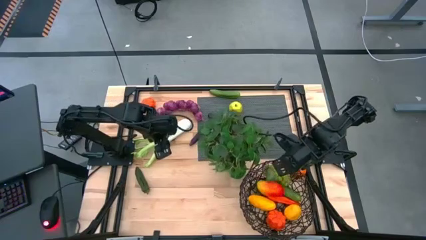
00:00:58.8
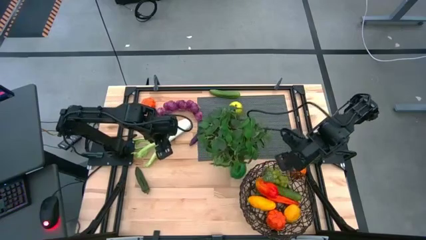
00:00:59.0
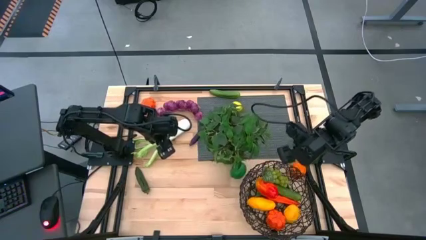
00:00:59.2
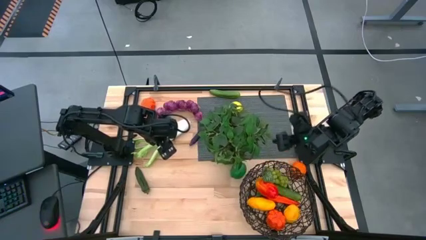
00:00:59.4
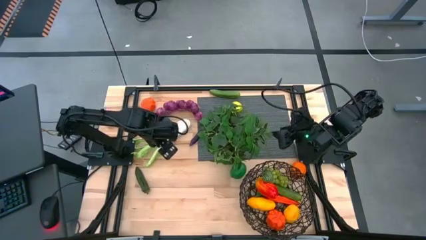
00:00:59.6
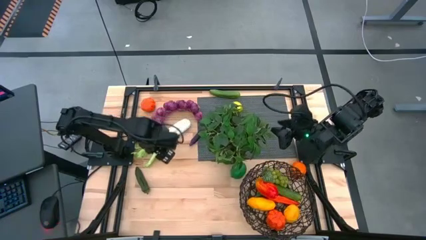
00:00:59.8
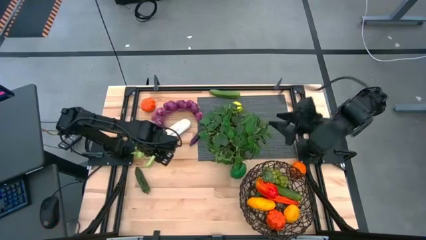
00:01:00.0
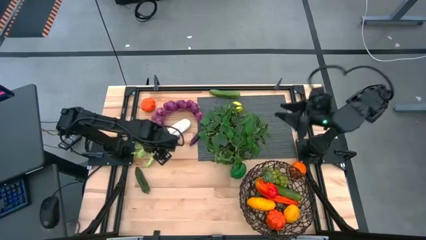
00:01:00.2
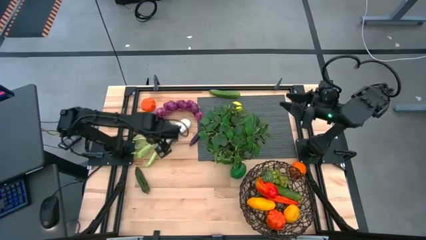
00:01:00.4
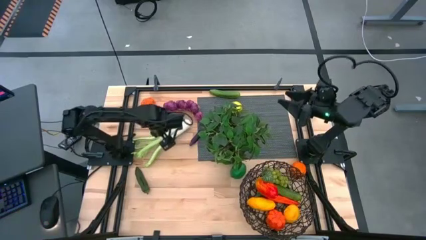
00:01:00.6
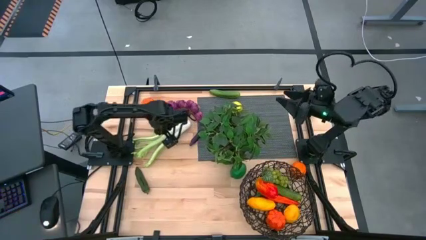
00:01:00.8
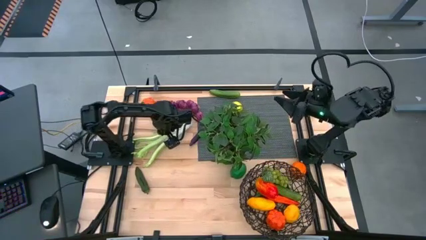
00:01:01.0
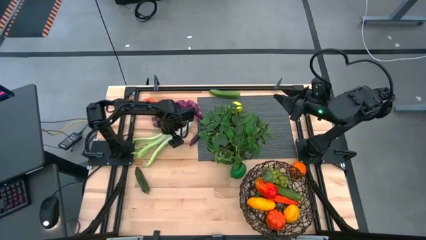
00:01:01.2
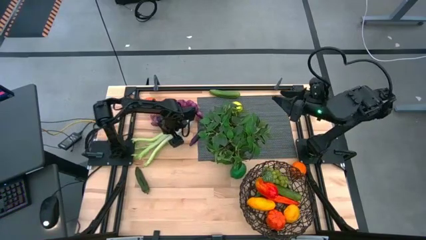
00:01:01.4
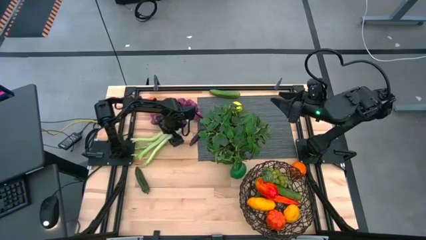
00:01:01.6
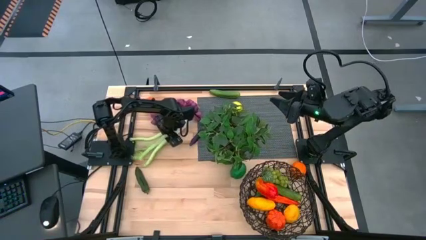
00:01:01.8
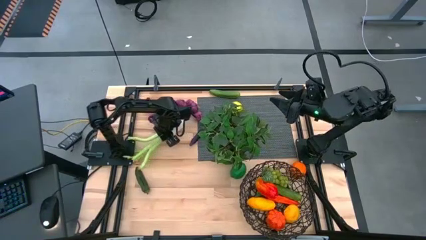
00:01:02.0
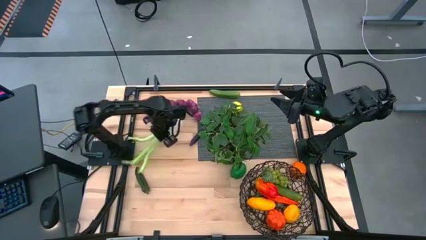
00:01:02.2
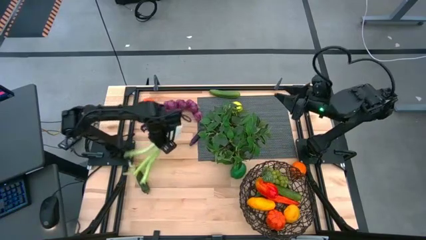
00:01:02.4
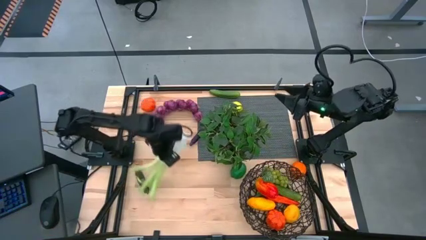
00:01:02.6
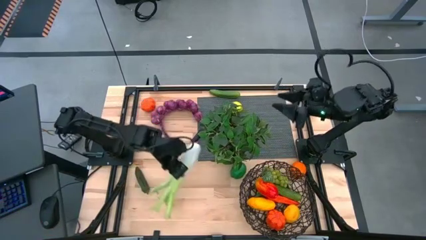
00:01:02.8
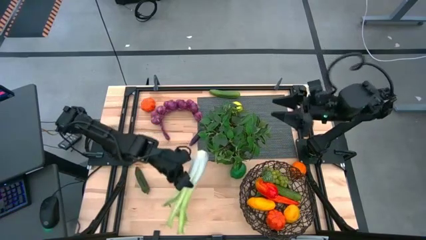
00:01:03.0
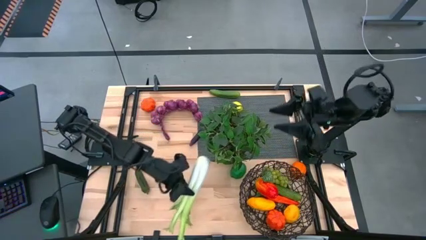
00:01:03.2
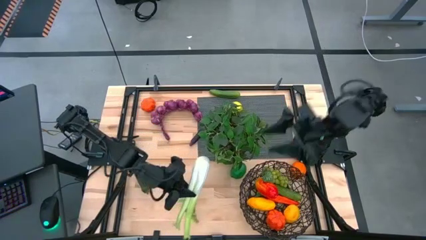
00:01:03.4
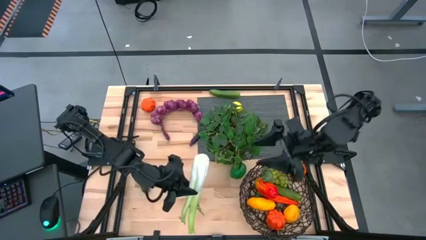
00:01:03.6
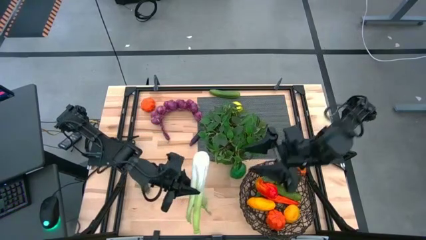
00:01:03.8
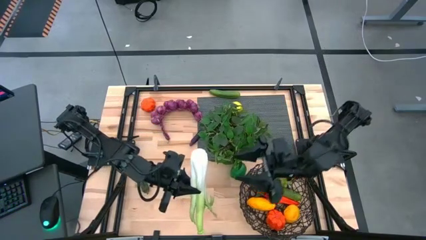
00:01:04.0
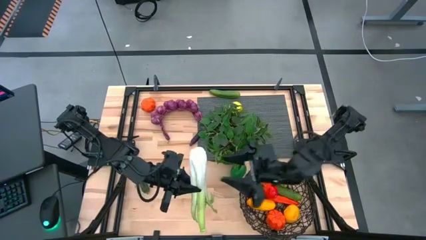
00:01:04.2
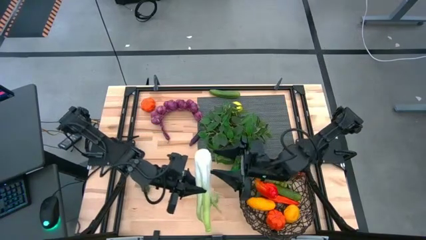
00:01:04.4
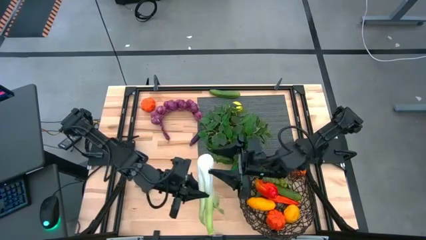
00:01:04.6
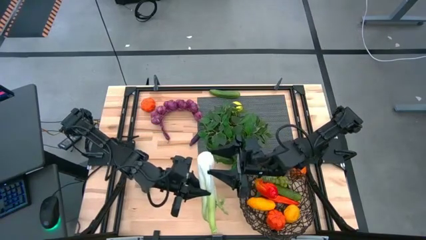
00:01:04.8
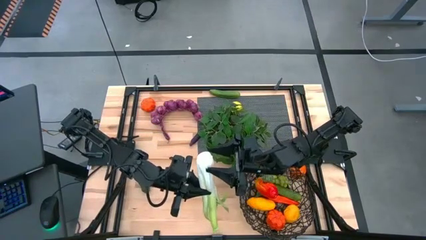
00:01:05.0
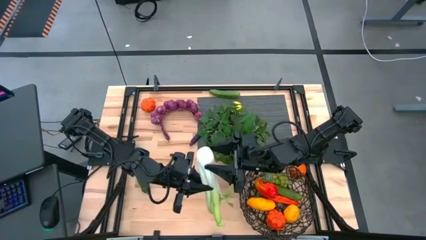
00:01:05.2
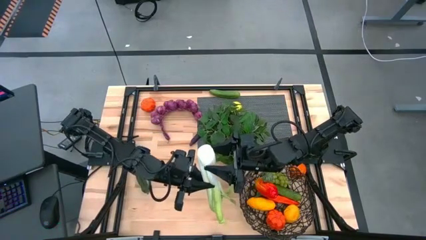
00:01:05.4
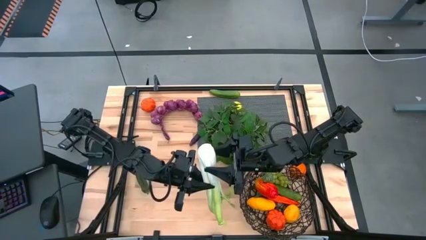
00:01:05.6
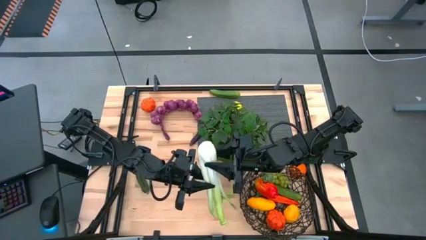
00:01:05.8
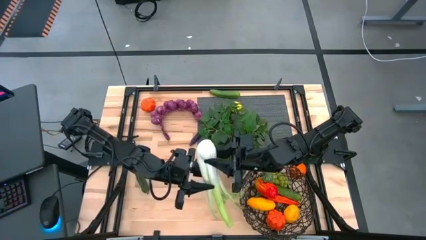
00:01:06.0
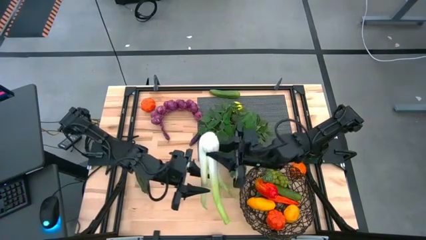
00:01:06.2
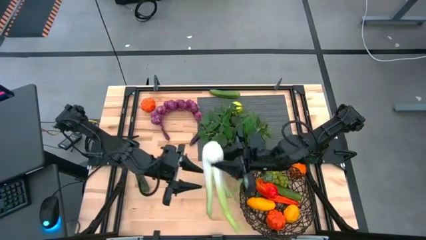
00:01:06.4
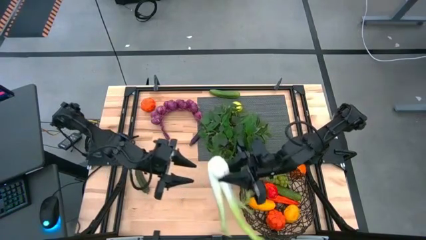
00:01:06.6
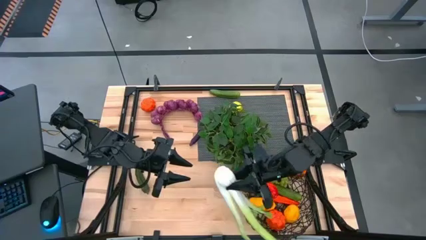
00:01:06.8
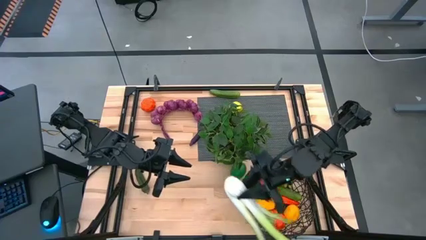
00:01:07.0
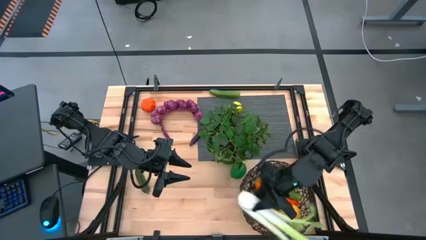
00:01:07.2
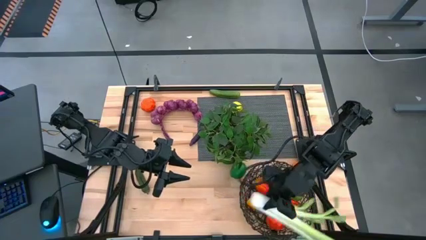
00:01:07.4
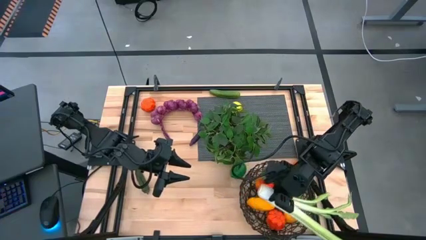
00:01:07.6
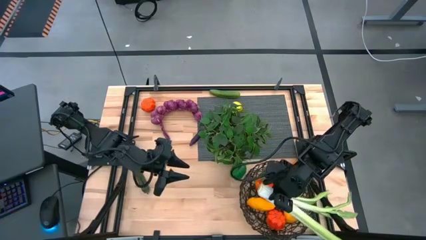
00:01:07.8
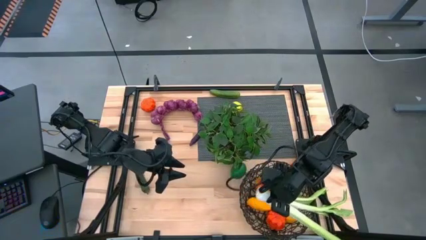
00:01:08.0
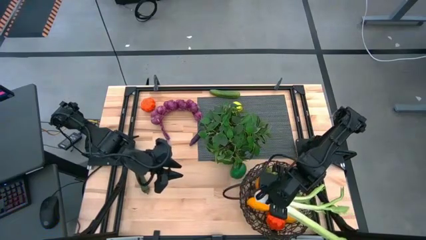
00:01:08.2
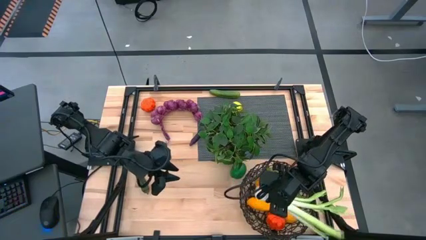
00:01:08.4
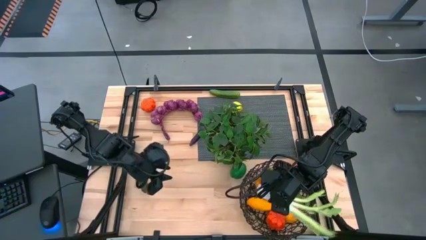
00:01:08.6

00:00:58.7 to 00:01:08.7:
Task: Build produce basket
Put the green celery into the brown wire basket

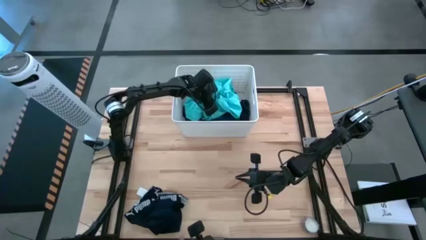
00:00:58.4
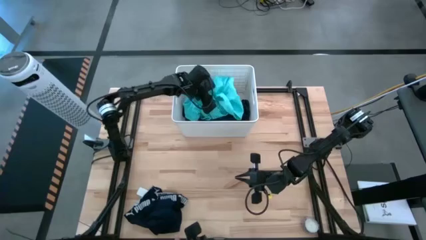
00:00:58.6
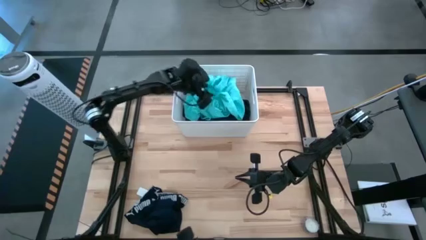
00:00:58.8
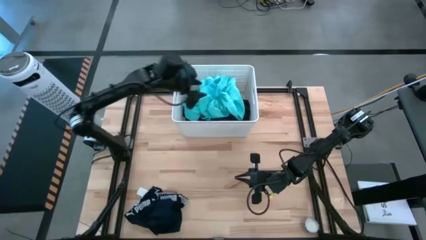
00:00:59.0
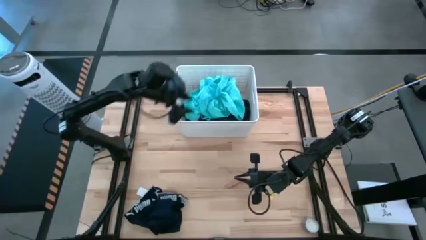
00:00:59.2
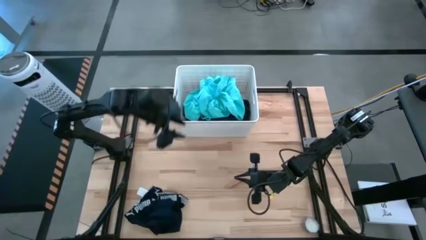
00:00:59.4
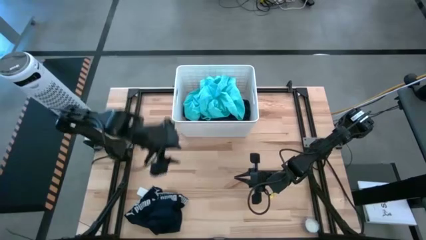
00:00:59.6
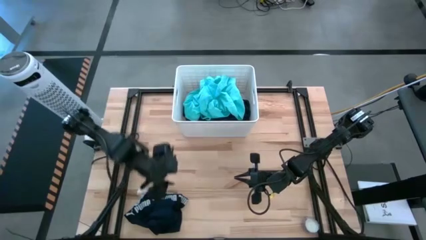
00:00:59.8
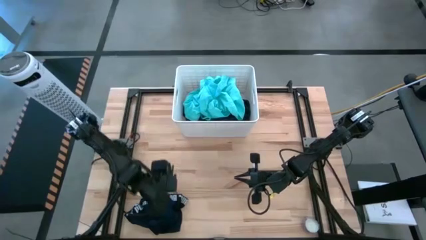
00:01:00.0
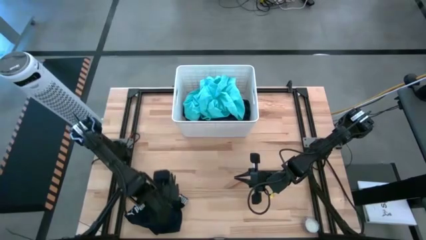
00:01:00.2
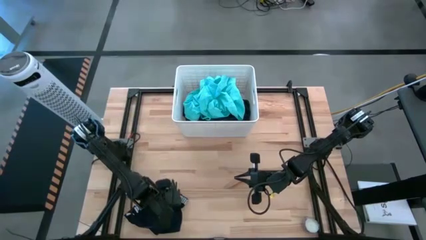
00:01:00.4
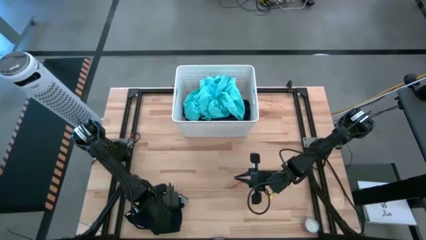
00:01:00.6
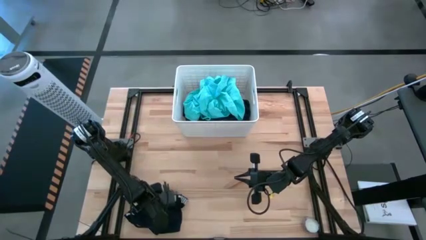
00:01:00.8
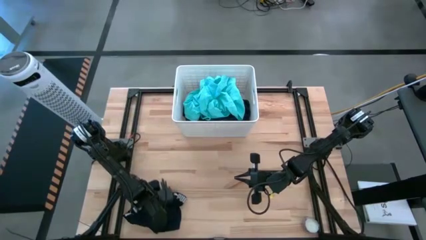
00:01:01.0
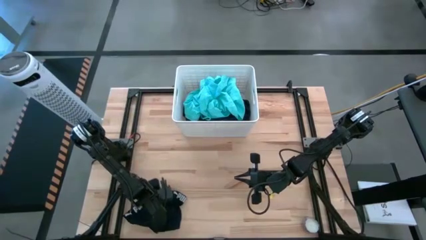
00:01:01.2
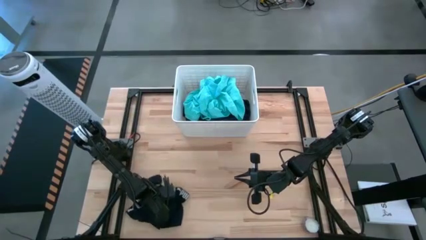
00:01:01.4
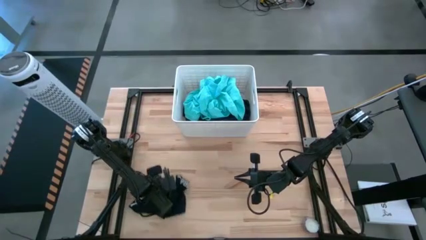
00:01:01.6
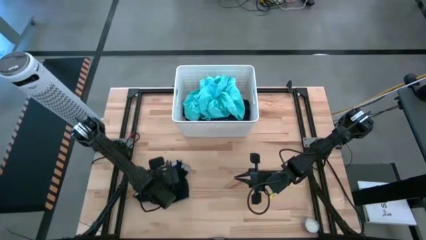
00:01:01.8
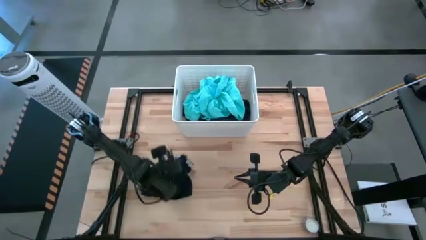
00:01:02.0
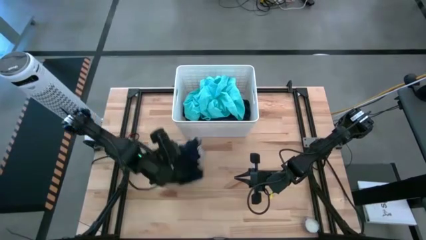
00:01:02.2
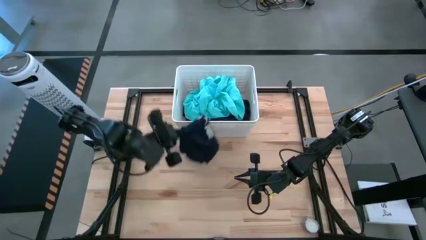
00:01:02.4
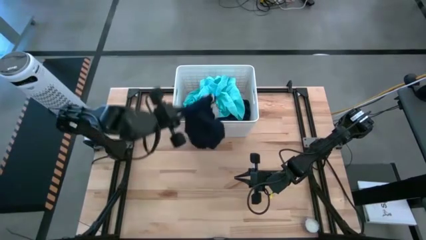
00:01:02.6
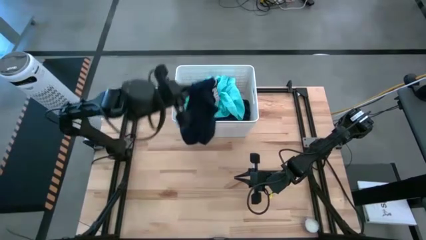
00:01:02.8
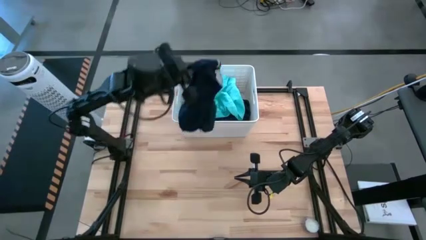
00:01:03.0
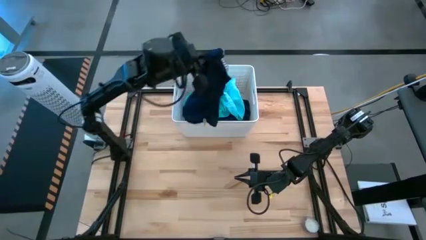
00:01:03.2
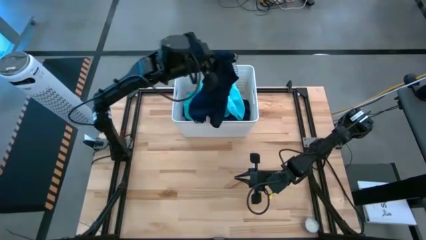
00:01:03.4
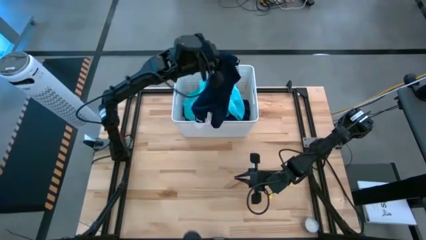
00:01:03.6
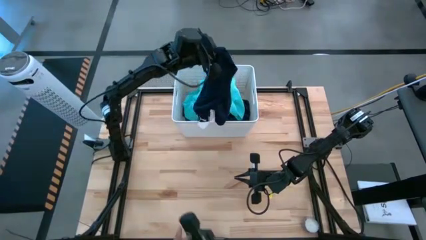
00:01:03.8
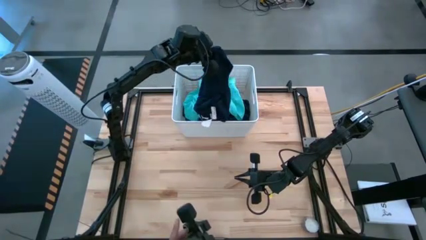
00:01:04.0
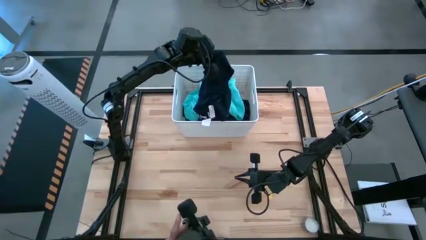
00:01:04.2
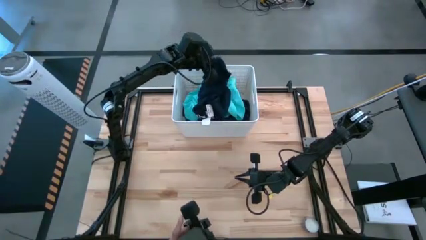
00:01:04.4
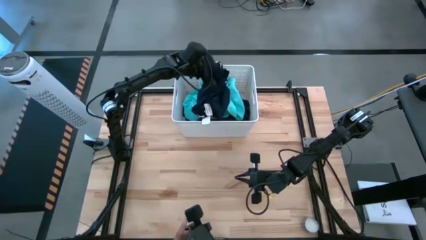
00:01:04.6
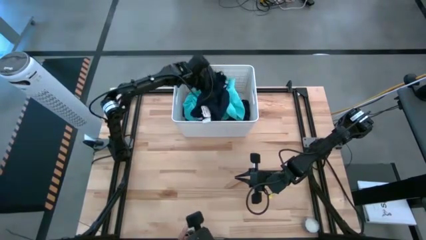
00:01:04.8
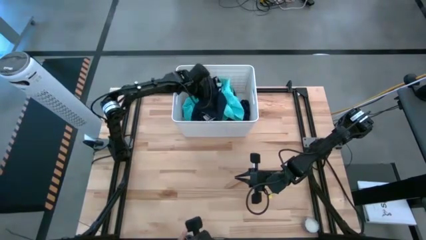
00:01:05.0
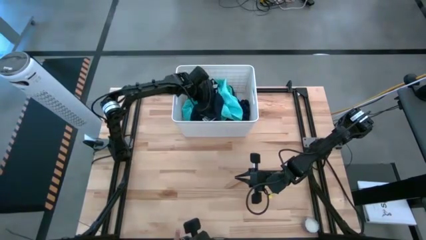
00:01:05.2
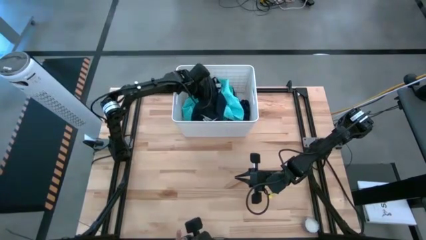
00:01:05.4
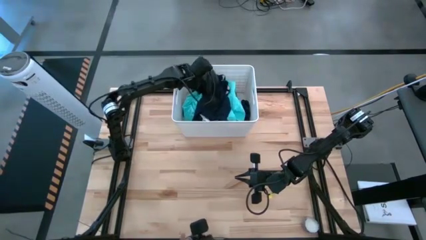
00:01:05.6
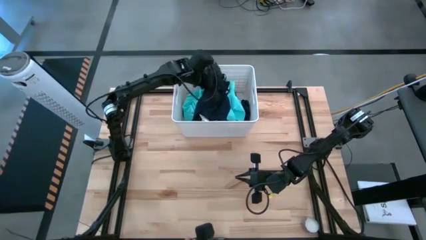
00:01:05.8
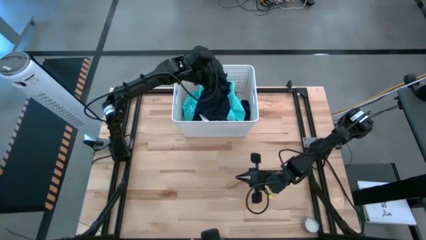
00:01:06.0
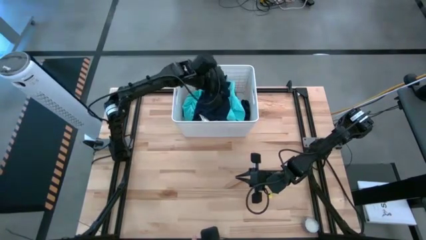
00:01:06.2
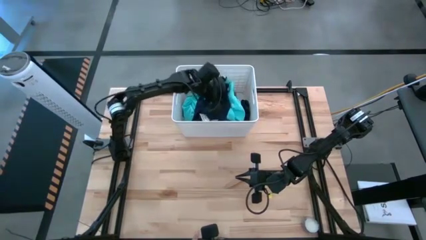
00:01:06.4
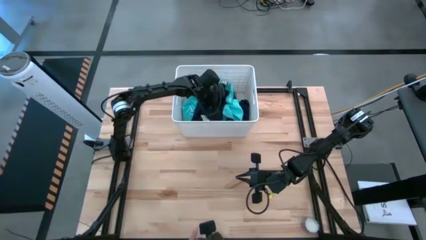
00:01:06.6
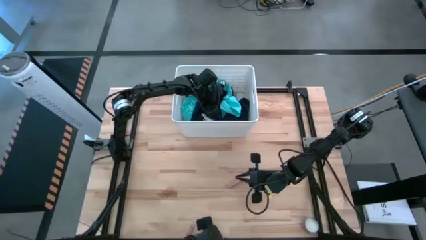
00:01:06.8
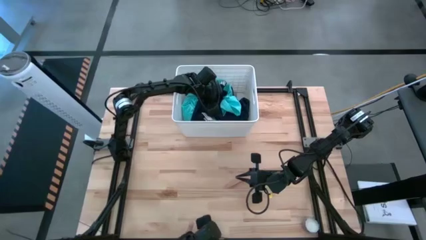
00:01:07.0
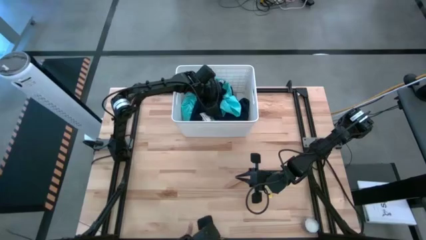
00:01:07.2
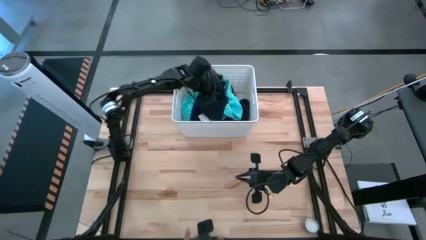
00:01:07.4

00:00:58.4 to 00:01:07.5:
Task: Sort clothes
Put the blue underwear into the white laundry bin
